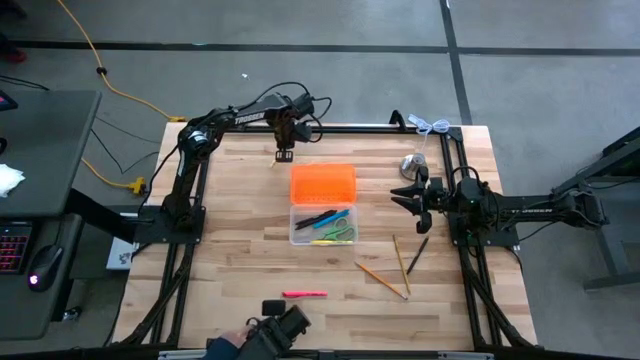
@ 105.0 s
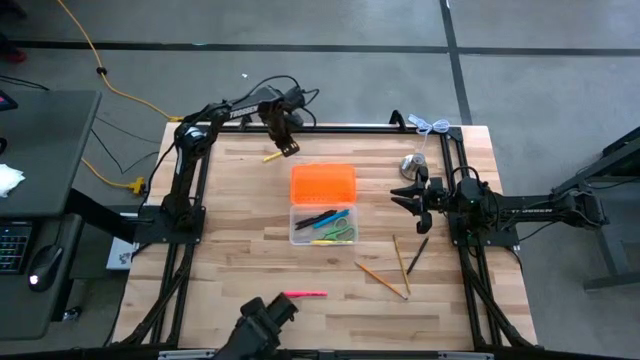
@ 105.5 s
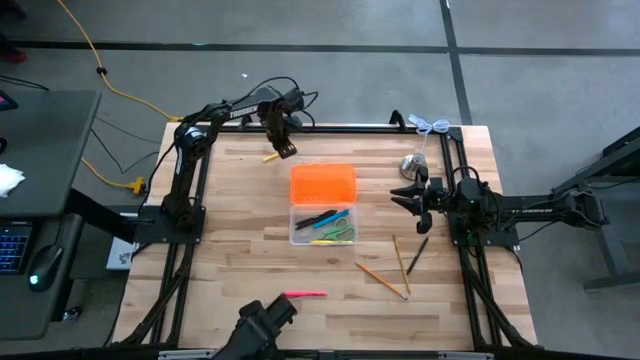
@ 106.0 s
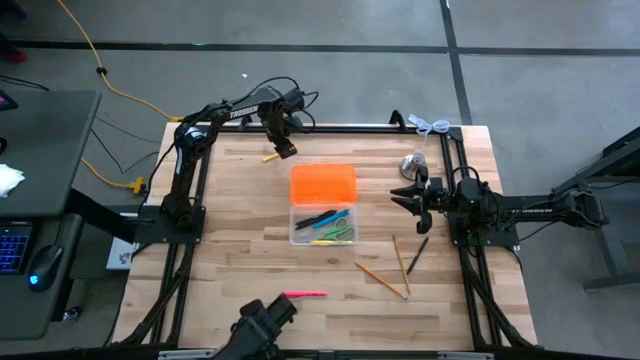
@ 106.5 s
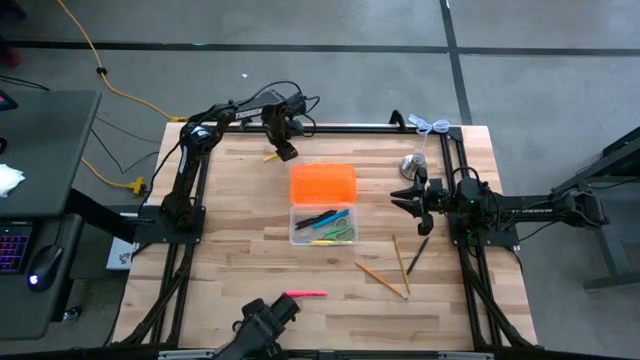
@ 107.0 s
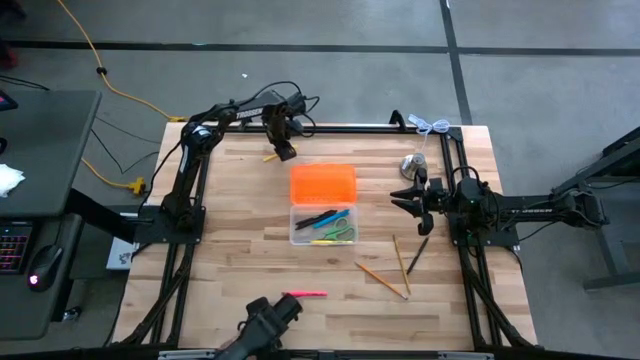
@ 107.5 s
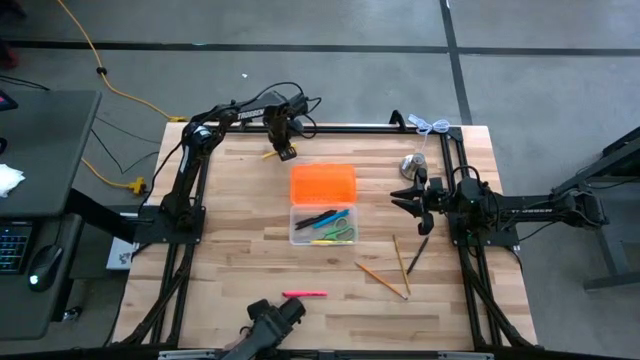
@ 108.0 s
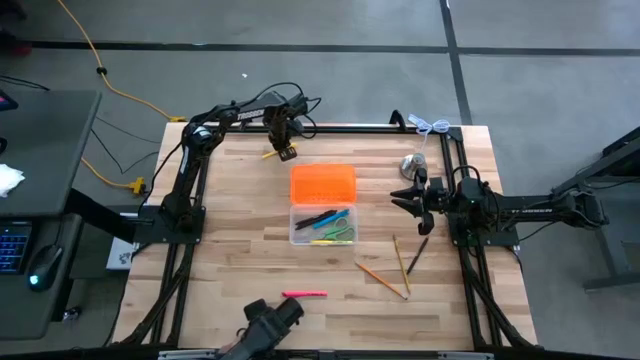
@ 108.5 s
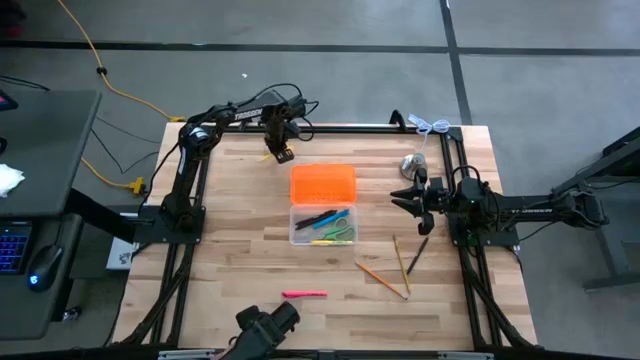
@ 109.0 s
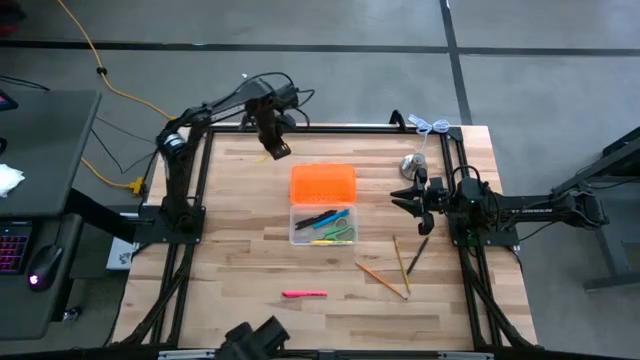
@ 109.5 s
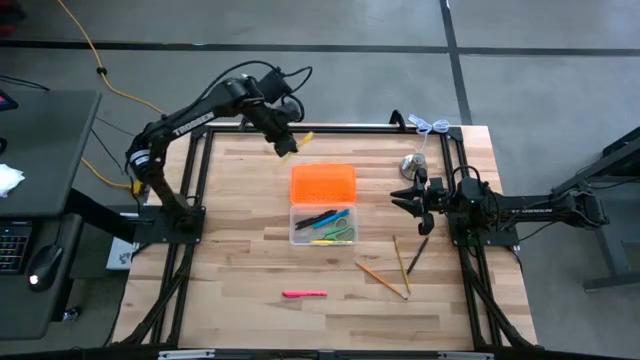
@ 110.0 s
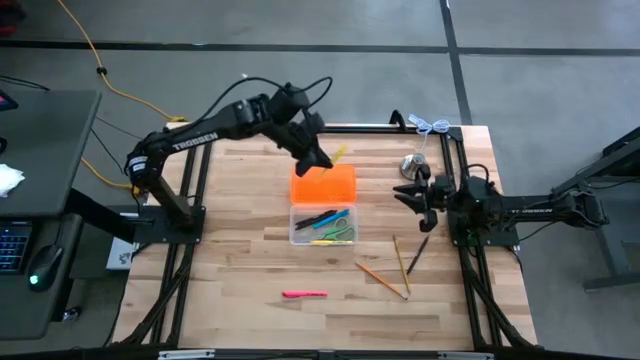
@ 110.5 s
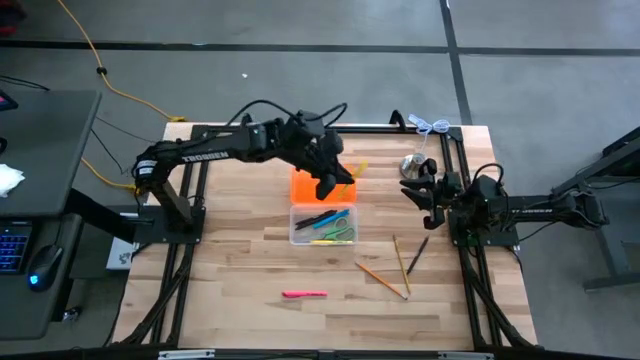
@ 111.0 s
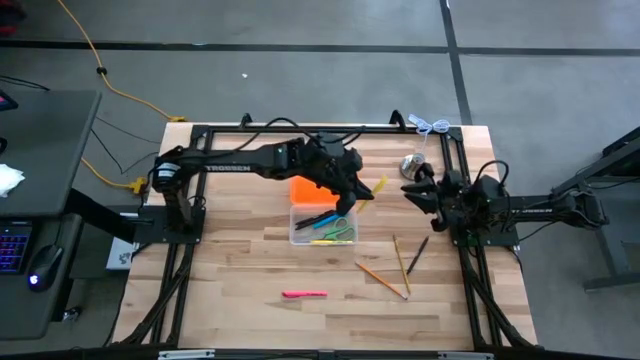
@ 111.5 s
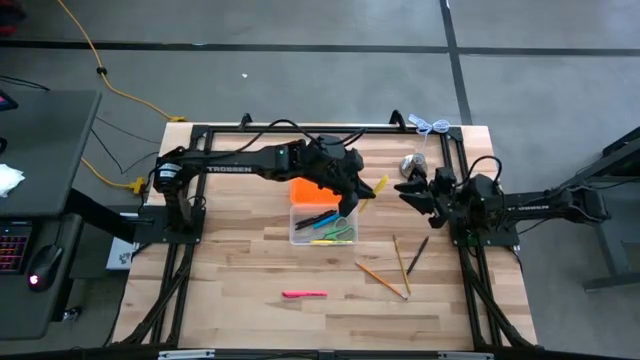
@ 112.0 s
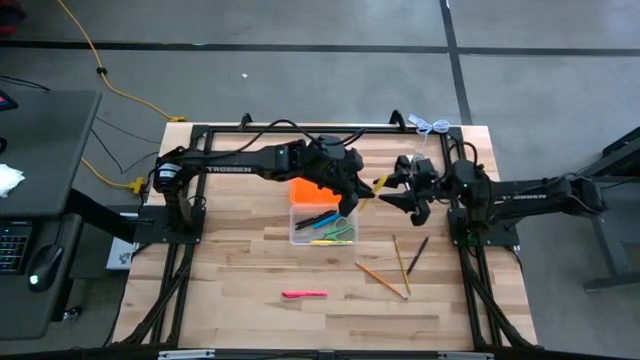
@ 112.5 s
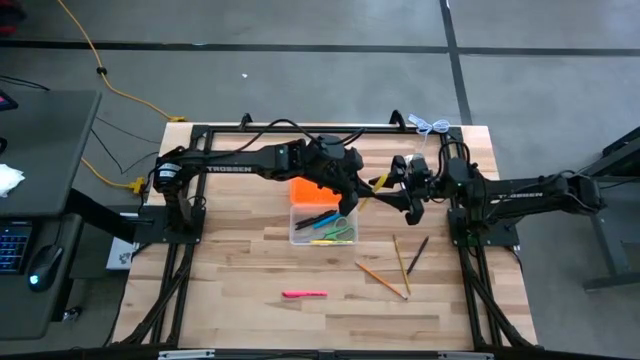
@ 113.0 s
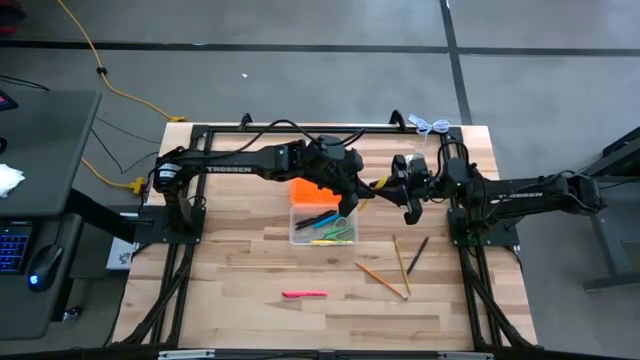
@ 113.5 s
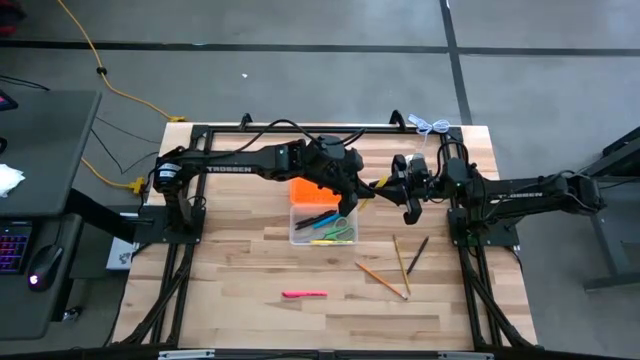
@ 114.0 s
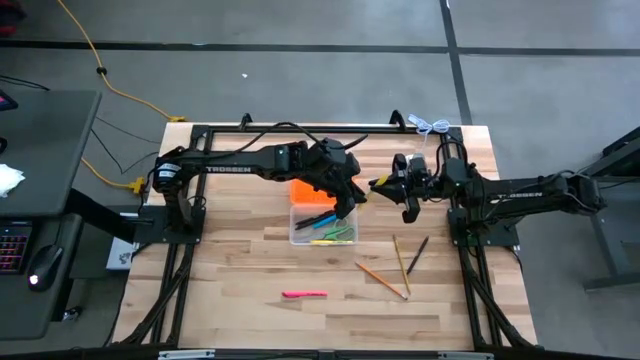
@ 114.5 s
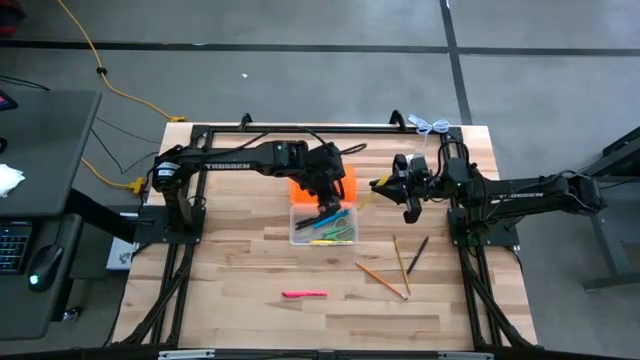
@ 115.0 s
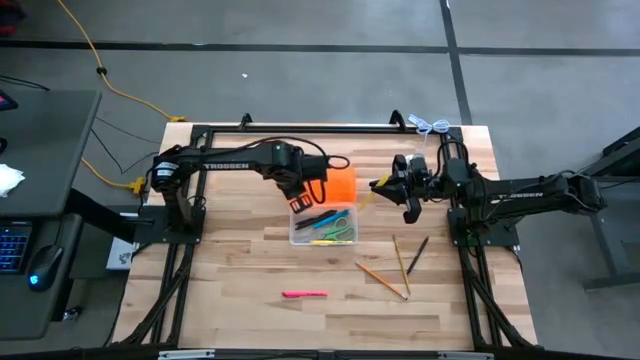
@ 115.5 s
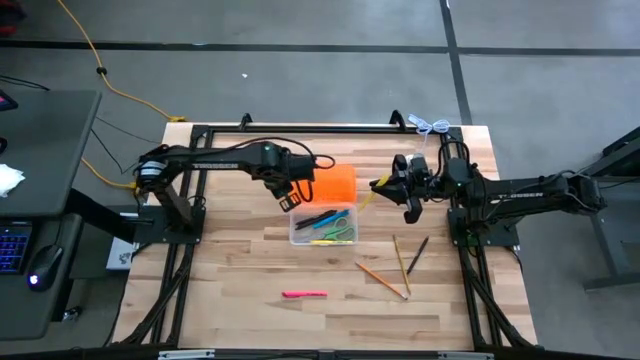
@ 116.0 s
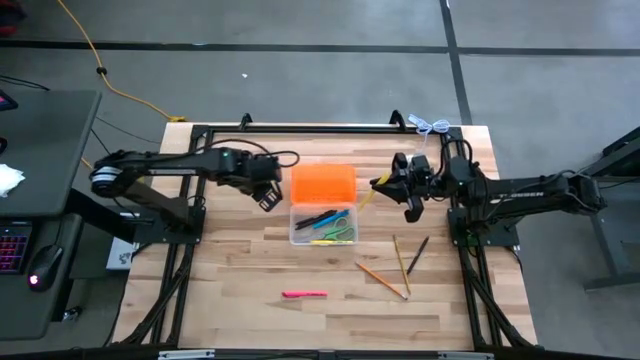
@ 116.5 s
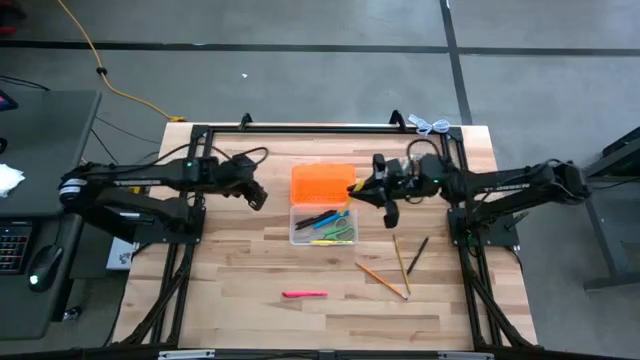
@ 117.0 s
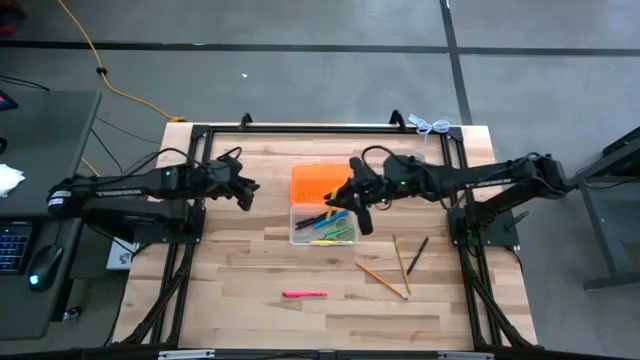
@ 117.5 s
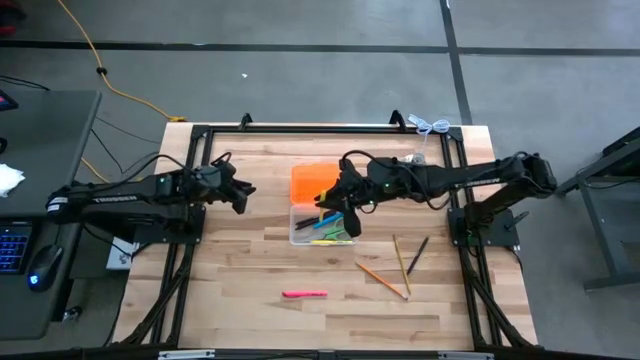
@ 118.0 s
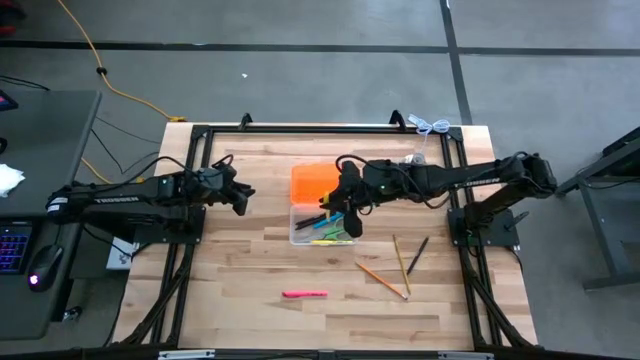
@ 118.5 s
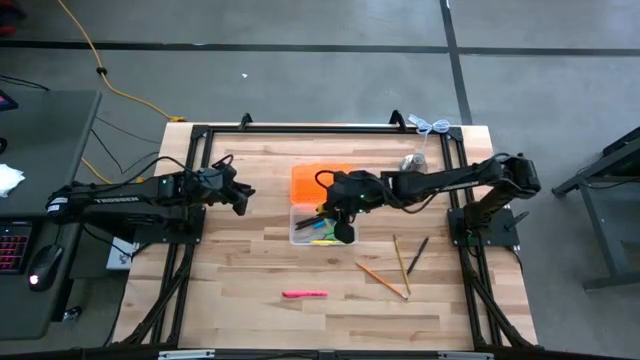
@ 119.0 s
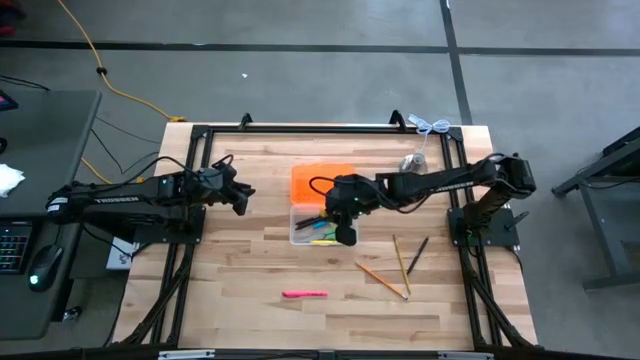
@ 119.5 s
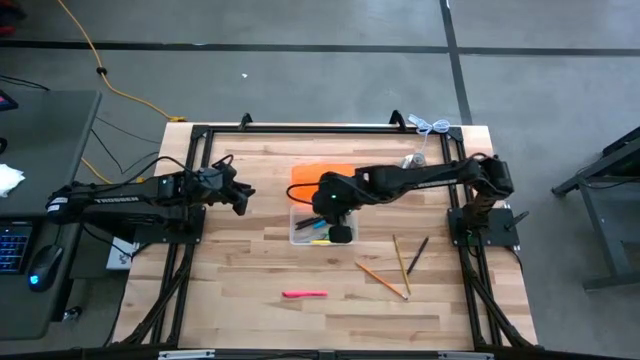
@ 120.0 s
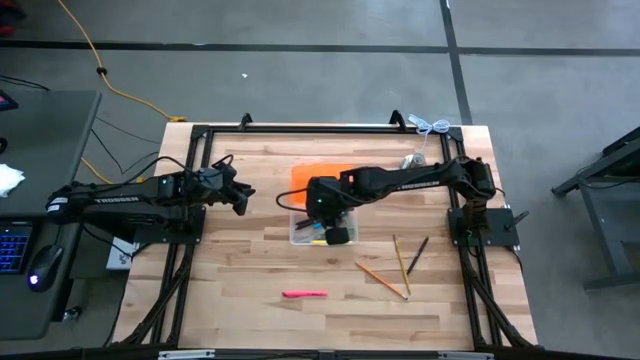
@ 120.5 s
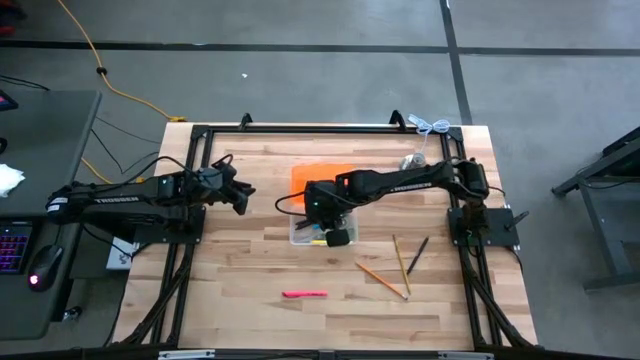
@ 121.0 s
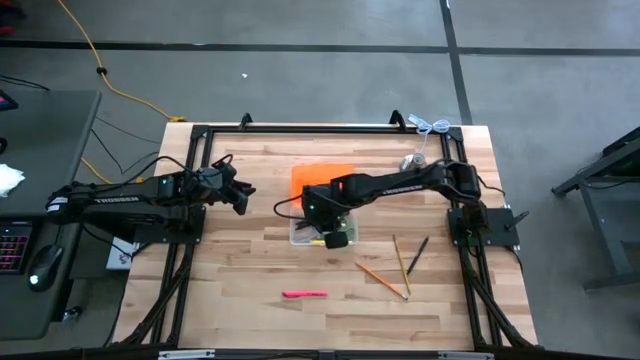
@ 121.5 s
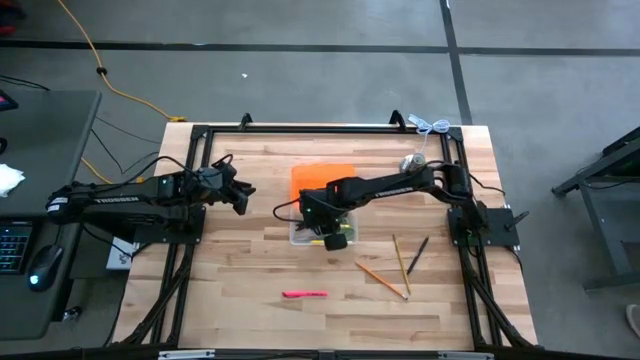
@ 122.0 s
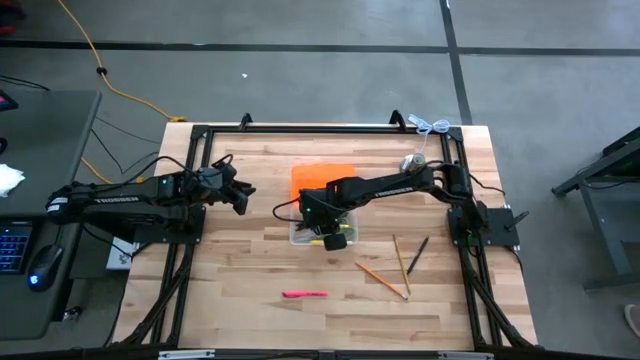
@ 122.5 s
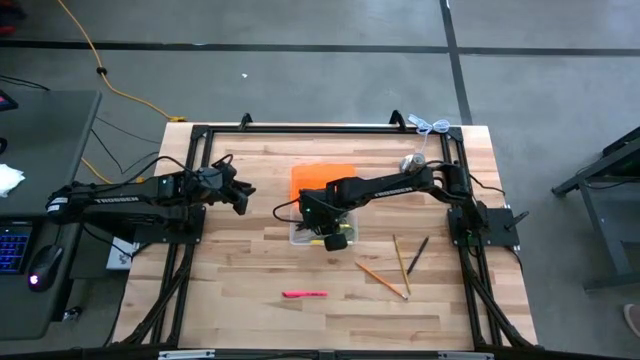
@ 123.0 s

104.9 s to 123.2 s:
Task: Pick & place school supplies into a supply box
Put the yellow pen into the orange supply box

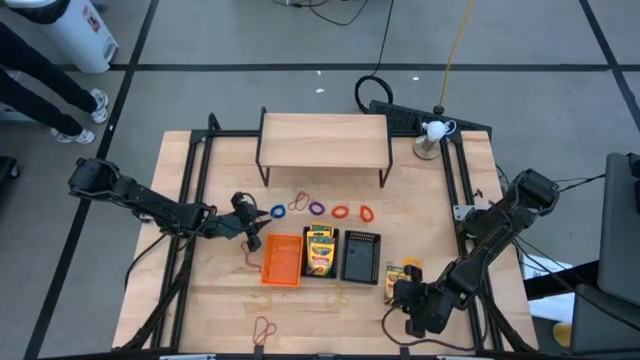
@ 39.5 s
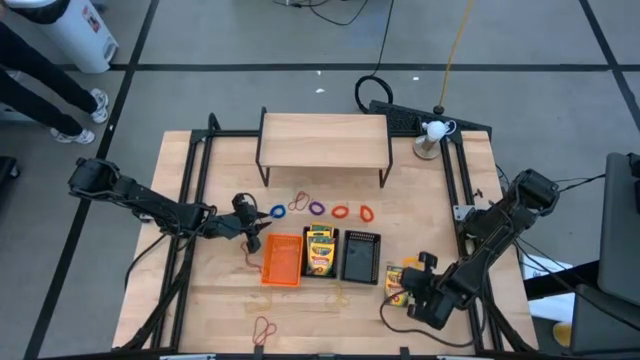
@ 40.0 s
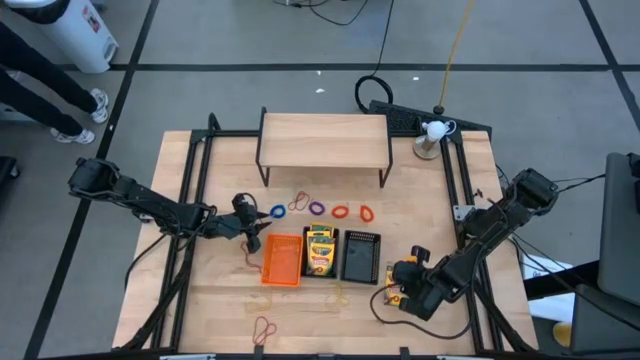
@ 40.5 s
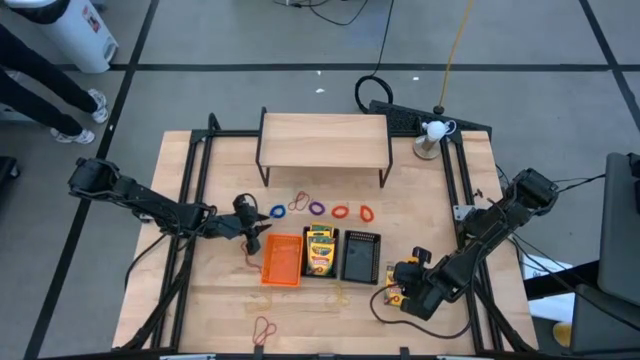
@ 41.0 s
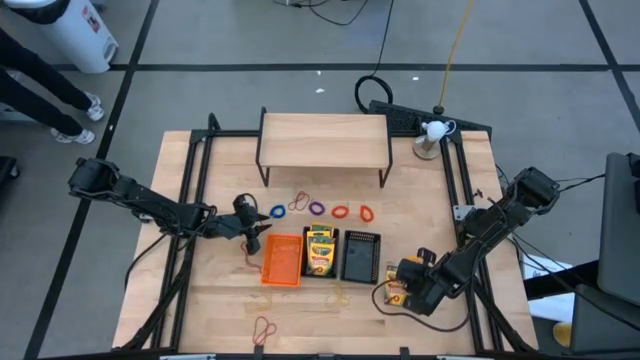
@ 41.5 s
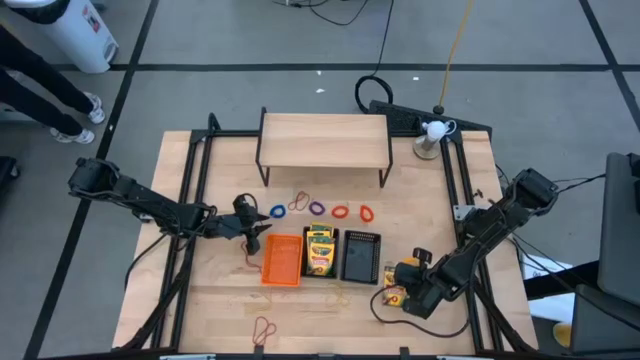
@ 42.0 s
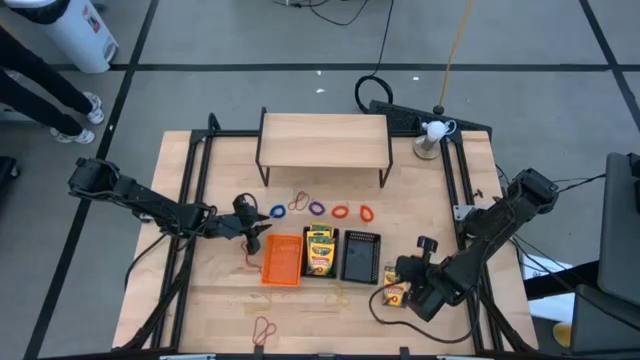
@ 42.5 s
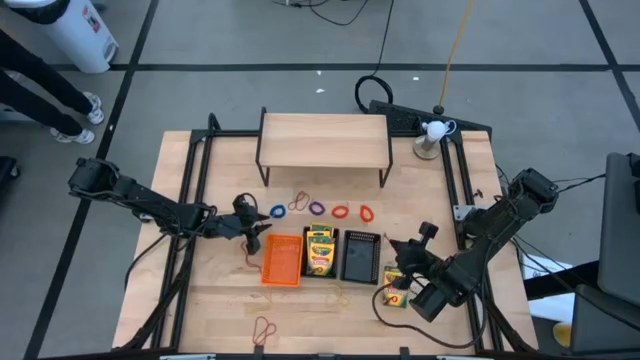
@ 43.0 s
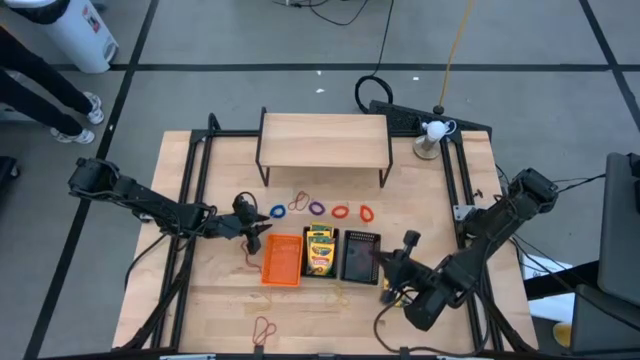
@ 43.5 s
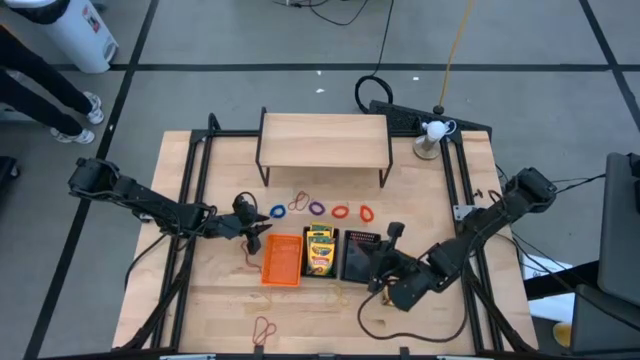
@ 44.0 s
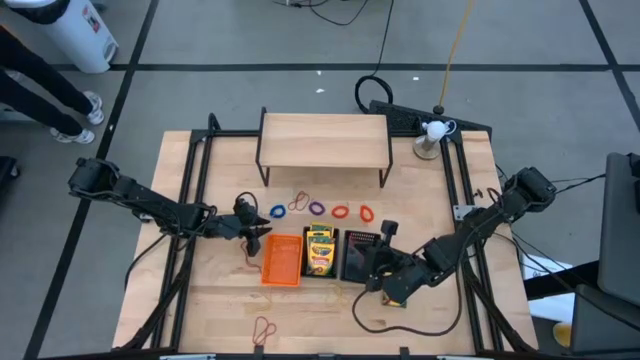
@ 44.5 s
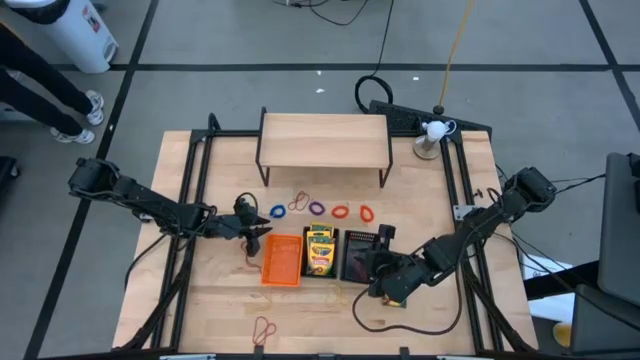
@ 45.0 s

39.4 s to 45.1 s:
Task: Pick & Place Office Desk Supplies
Put the red rubber band into the right black bin
